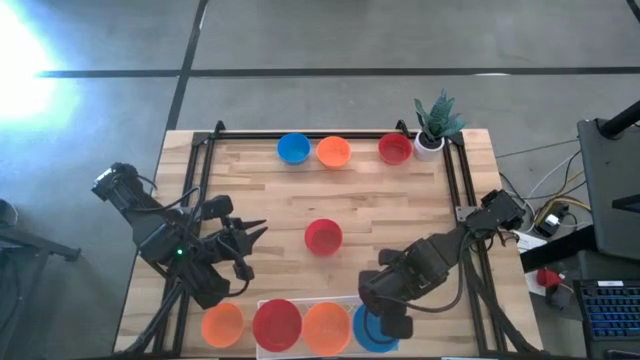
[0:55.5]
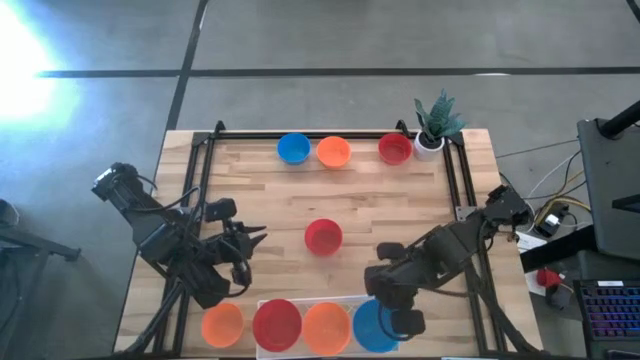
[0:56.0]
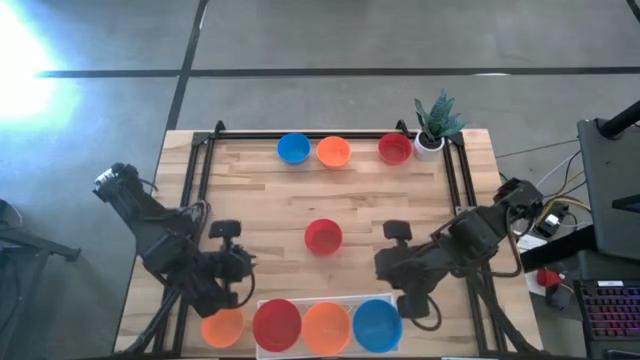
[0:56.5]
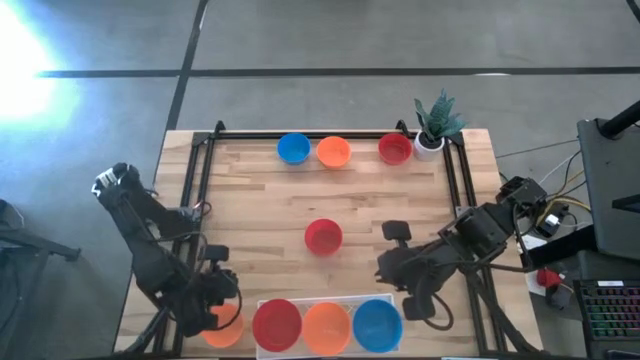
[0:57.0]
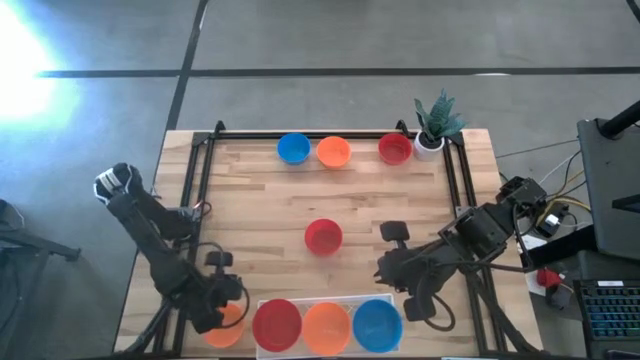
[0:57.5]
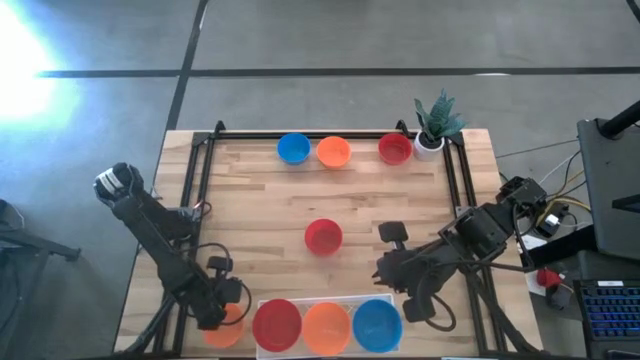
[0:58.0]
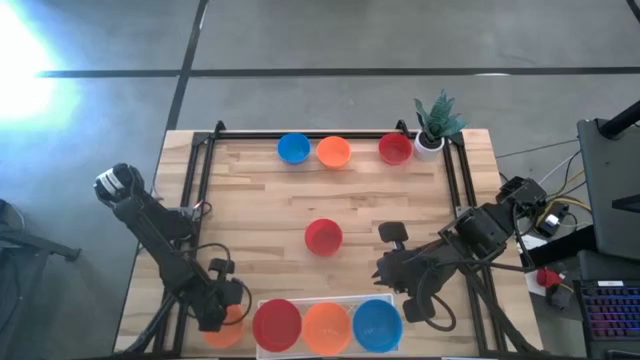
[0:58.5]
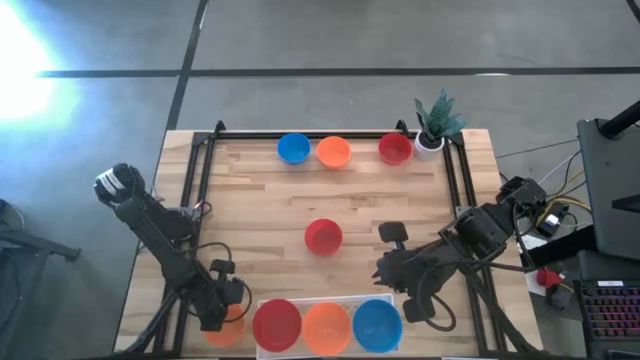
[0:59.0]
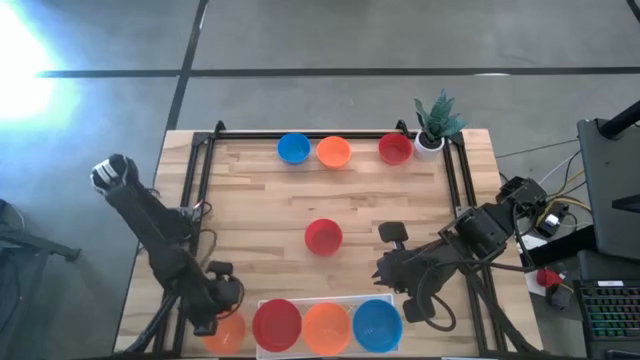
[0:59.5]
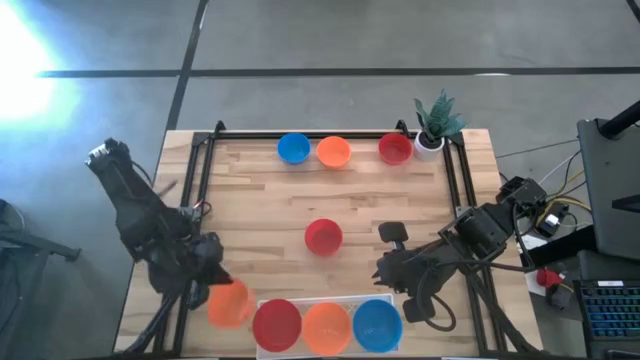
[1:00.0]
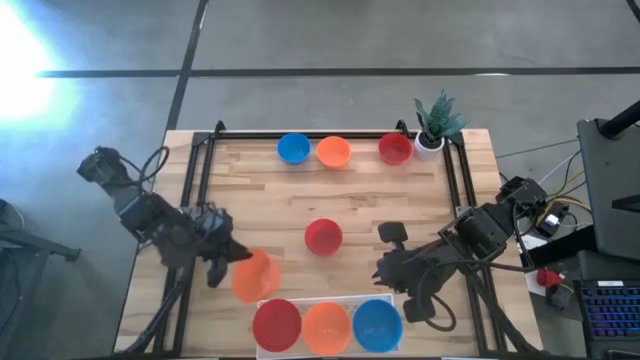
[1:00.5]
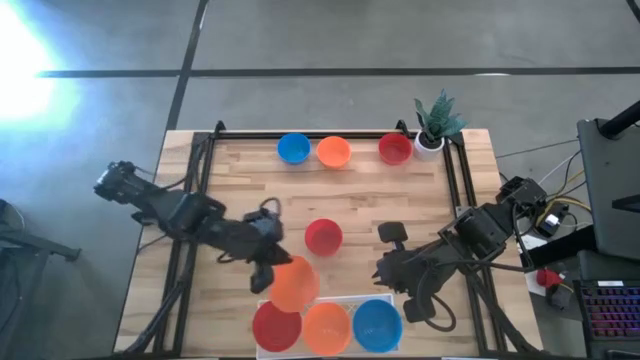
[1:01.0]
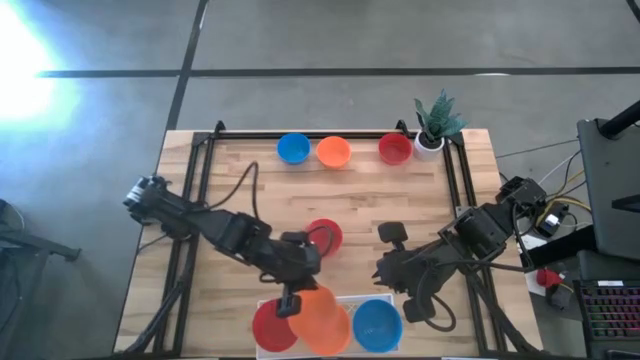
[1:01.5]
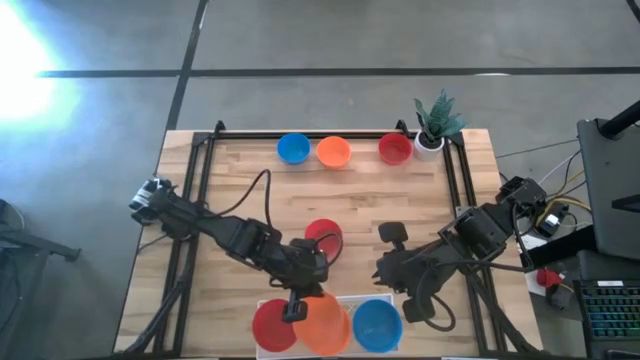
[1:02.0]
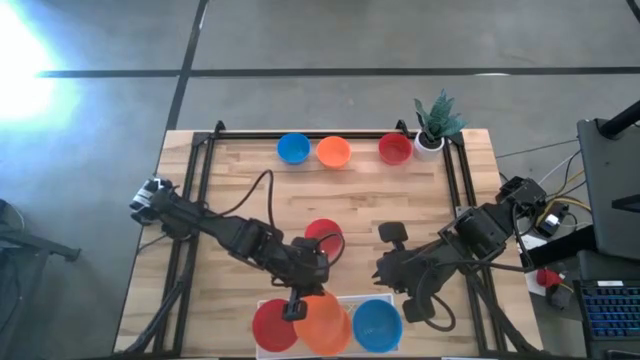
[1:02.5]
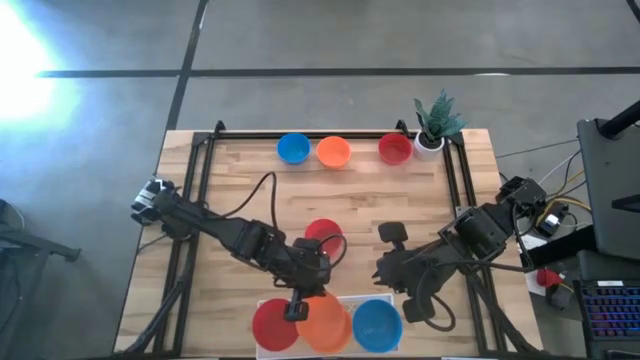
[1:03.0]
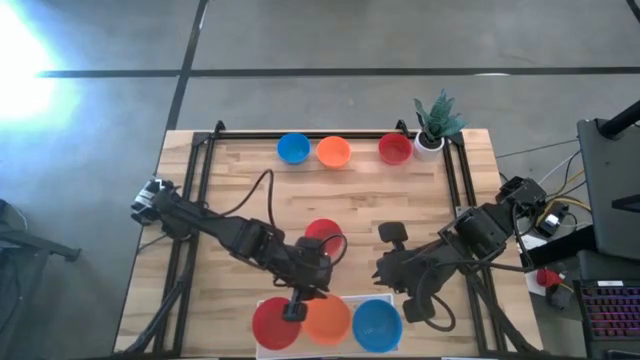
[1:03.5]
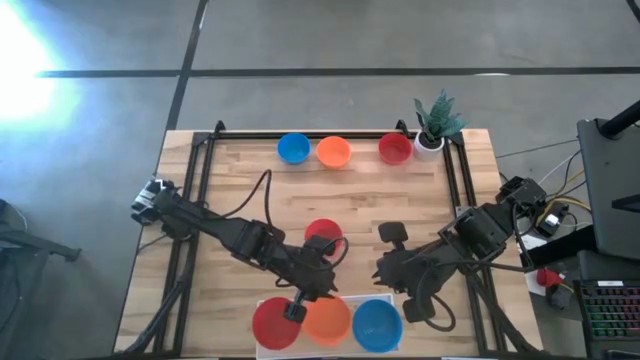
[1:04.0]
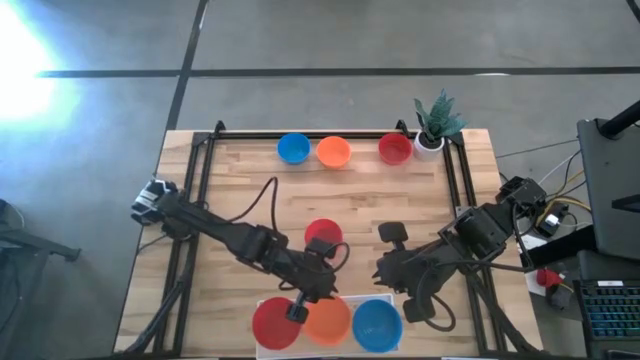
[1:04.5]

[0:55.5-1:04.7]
Task: Pick & Place Mini bowls
Stack the bottom orange bowl on the other orange bowl on the shelf

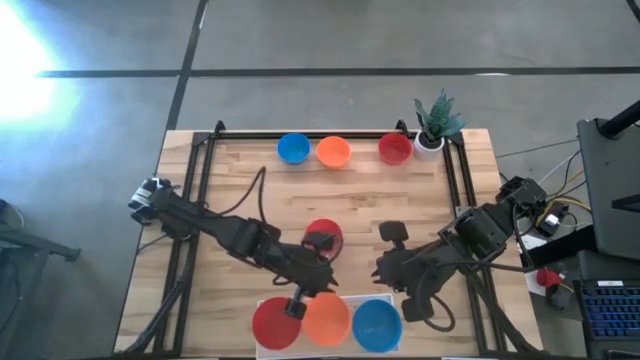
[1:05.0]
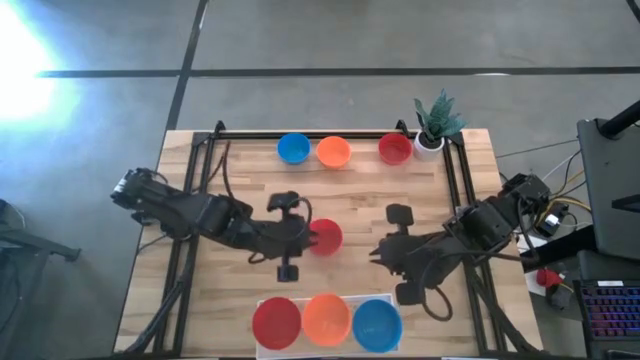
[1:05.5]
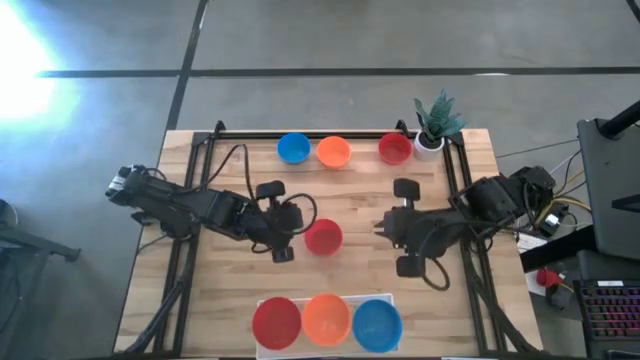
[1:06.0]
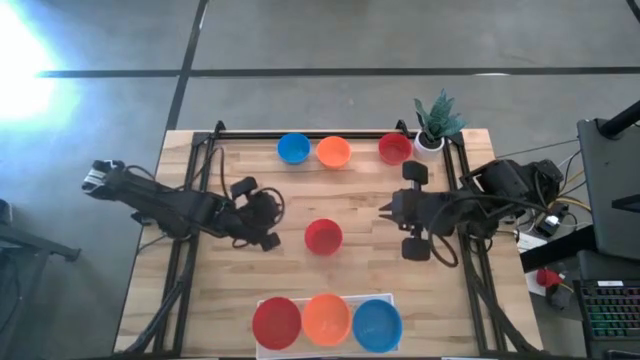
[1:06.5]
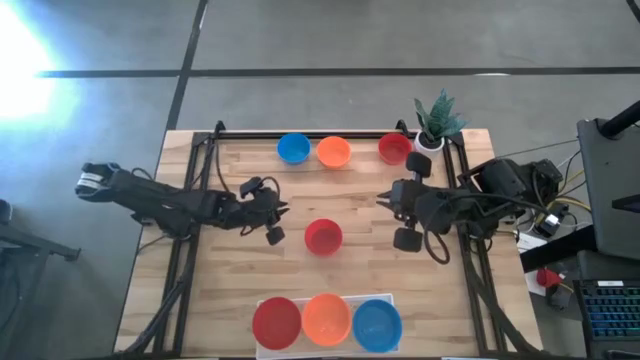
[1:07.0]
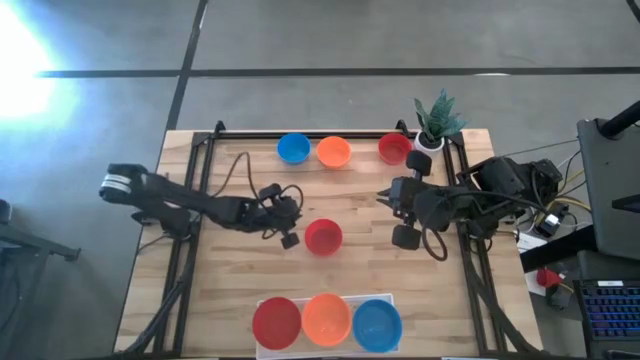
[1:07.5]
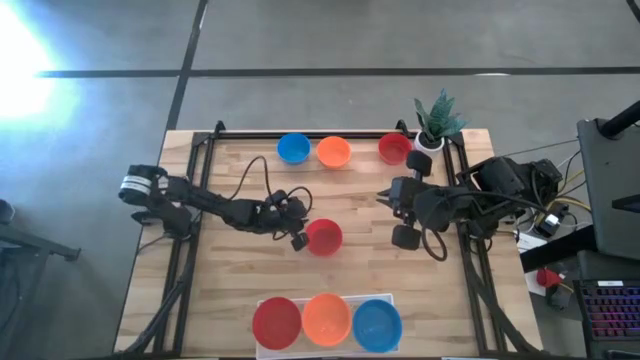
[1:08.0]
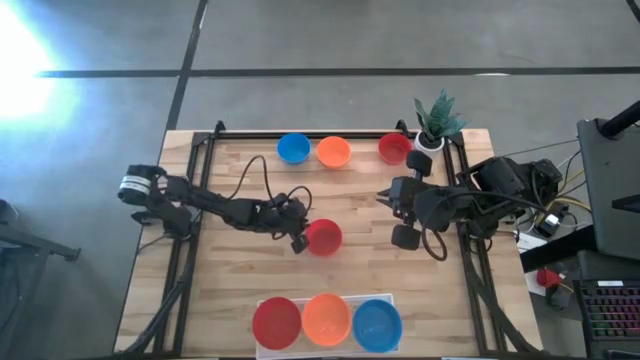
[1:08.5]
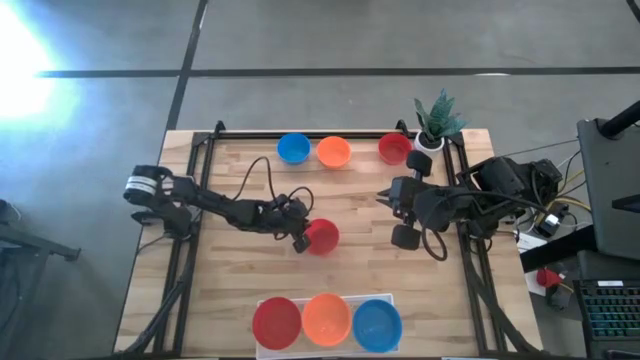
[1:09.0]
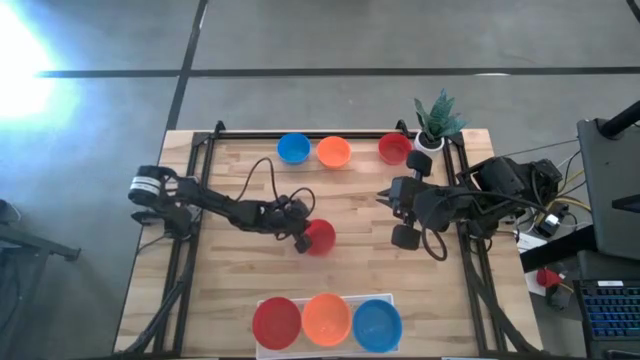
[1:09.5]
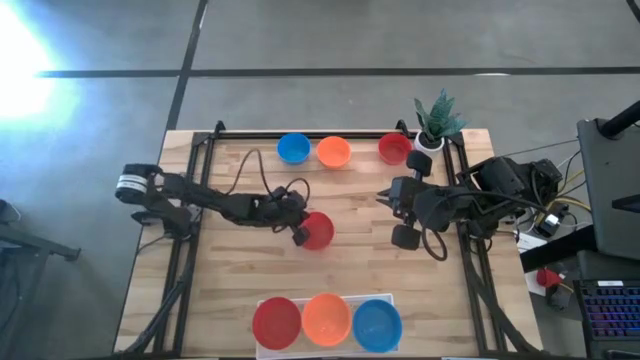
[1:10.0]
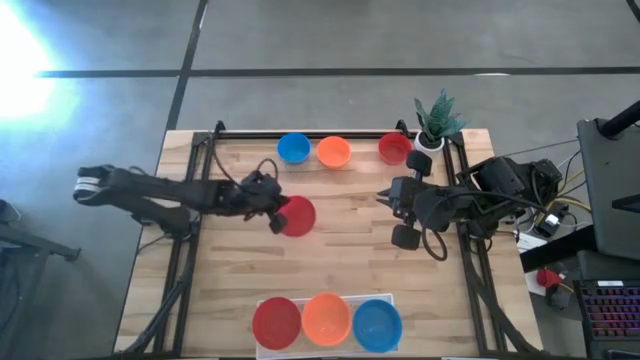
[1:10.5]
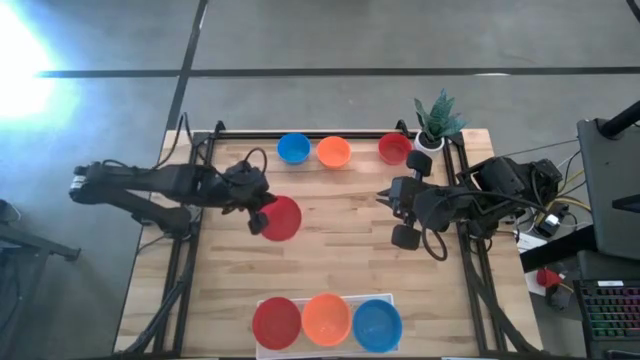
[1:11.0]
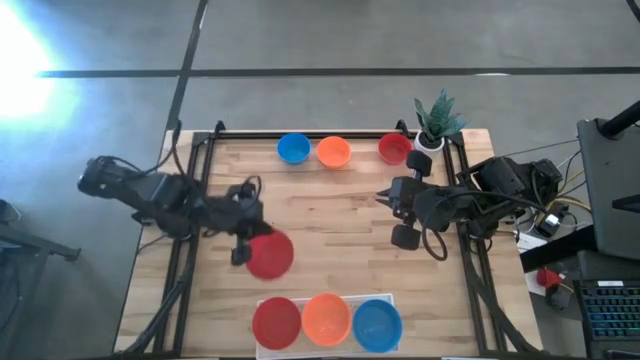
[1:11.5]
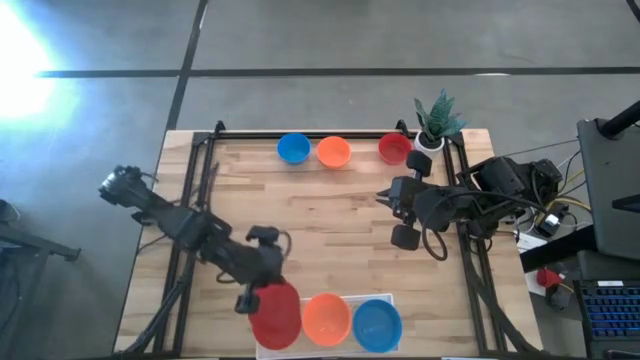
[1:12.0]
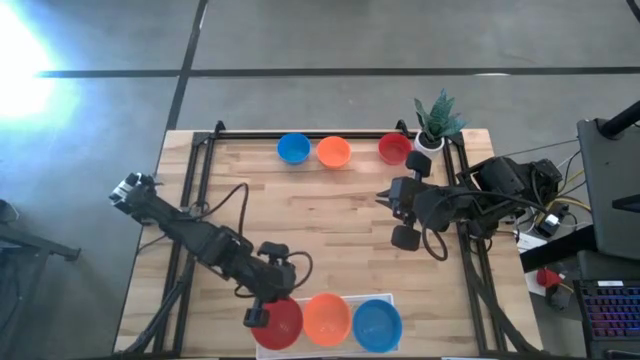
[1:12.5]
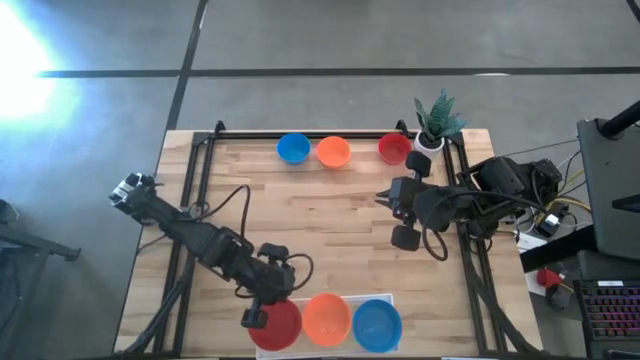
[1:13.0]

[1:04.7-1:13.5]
Stack the bottom red bowl on top of the other red bowl on the shelf

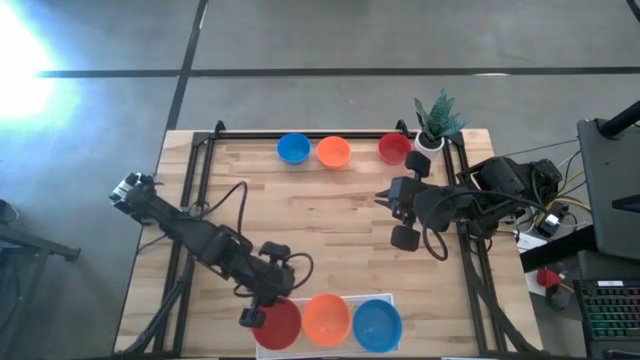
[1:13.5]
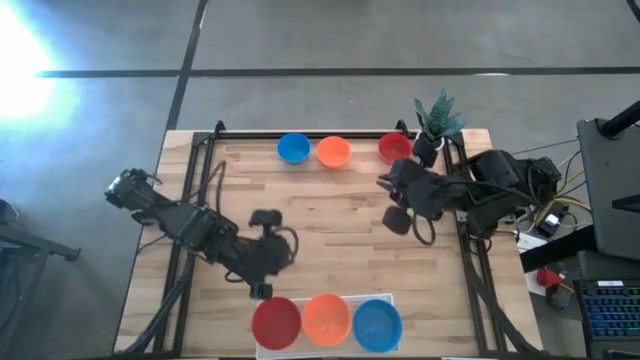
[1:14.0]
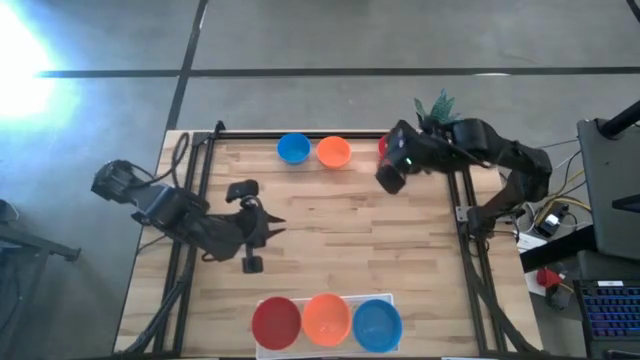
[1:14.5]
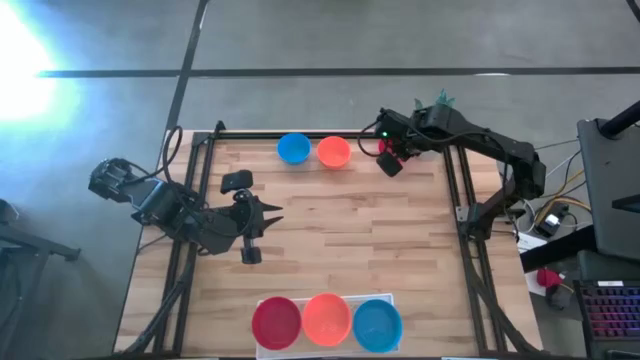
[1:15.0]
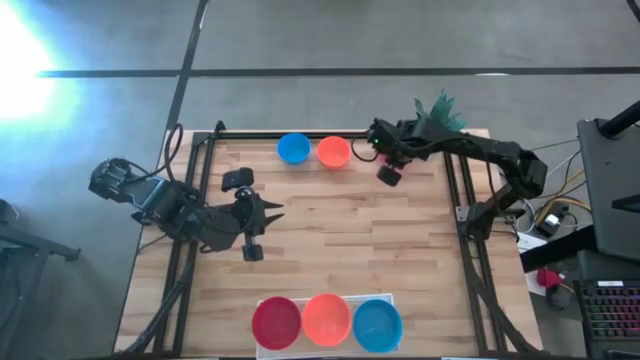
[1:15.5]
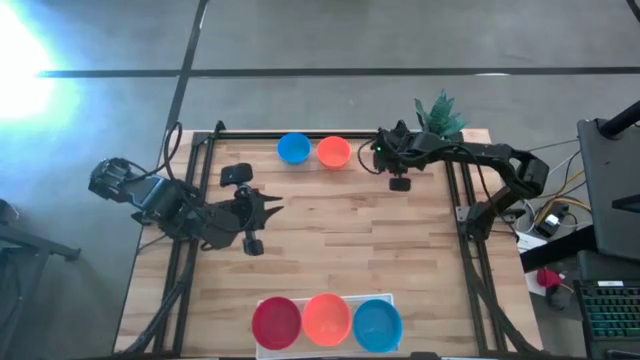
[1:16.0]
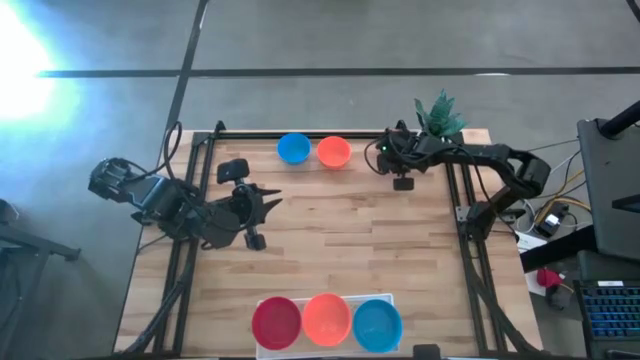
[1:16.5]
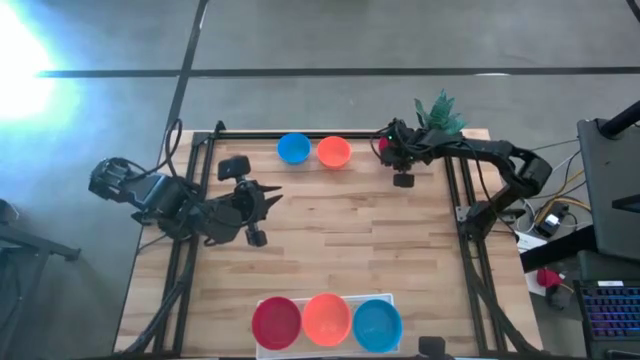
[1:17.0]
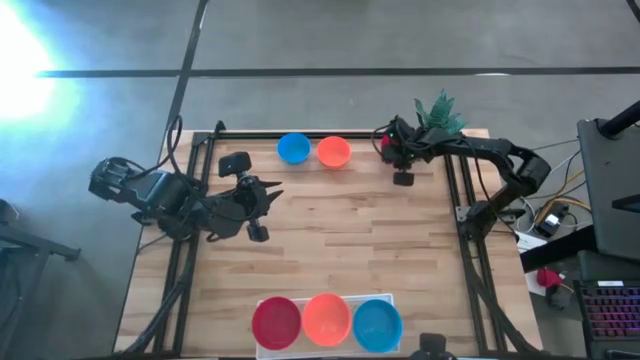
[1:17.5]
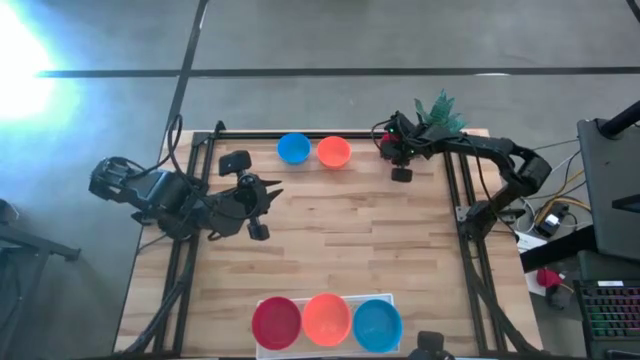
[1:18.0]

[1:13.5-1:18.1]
Stack the red bowl on top of the other red bowl on the shelf
